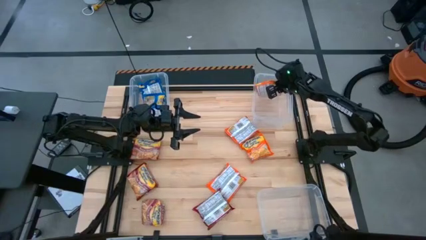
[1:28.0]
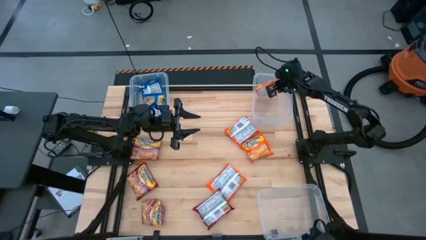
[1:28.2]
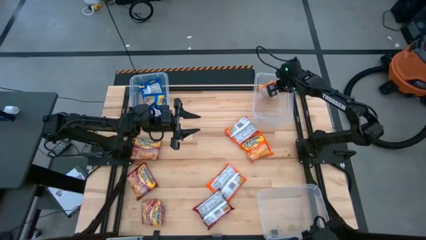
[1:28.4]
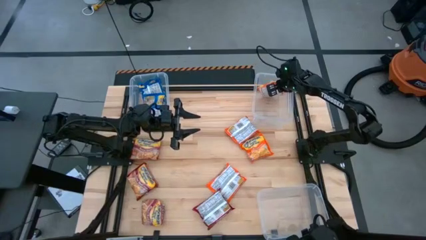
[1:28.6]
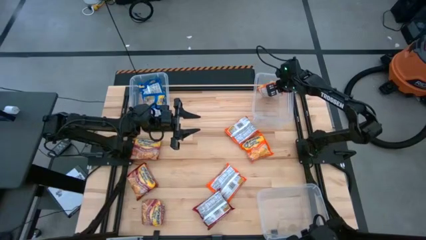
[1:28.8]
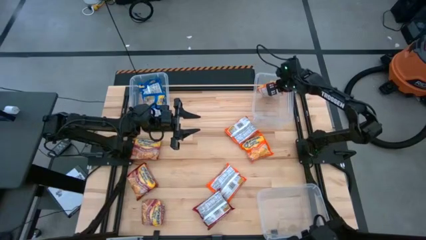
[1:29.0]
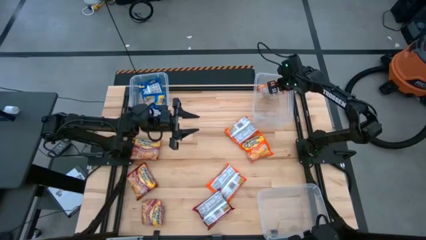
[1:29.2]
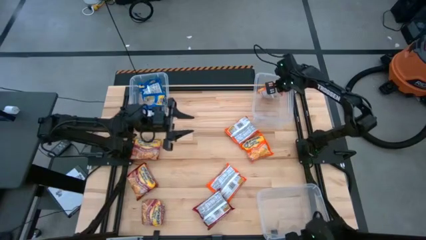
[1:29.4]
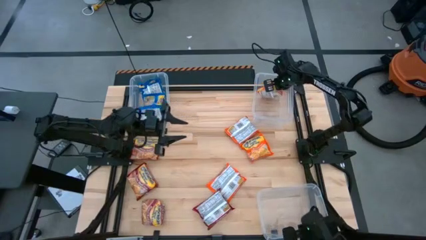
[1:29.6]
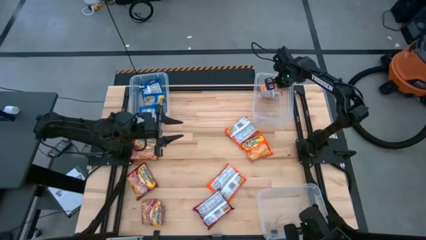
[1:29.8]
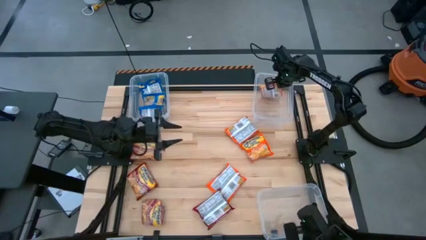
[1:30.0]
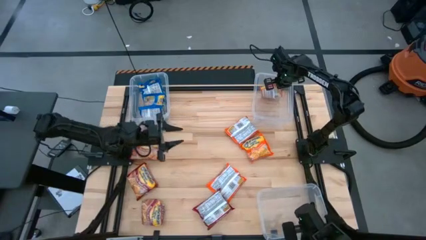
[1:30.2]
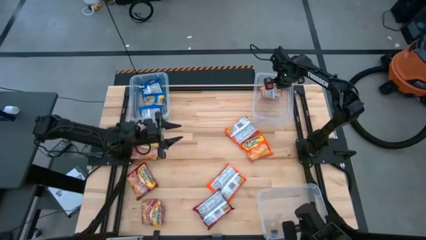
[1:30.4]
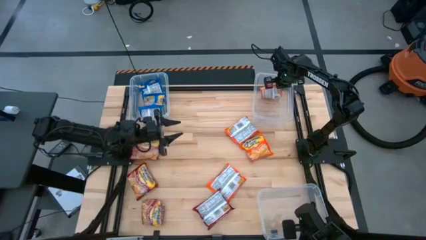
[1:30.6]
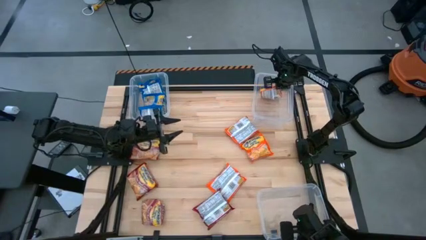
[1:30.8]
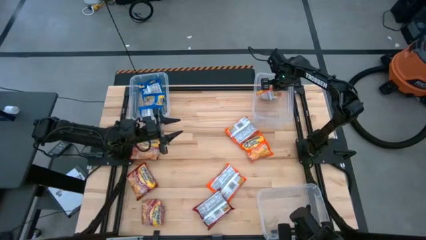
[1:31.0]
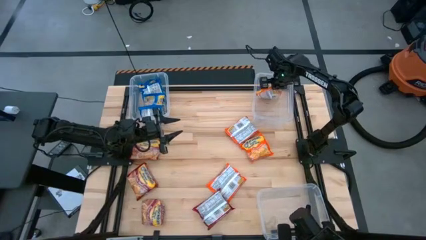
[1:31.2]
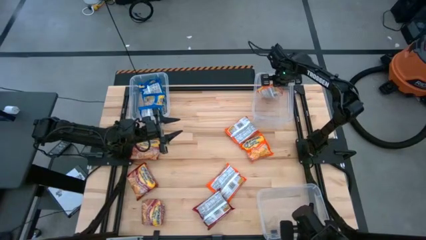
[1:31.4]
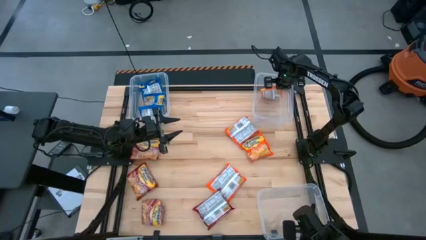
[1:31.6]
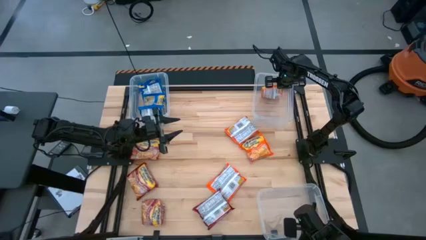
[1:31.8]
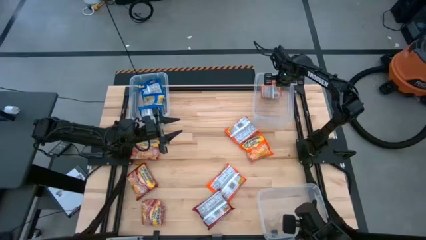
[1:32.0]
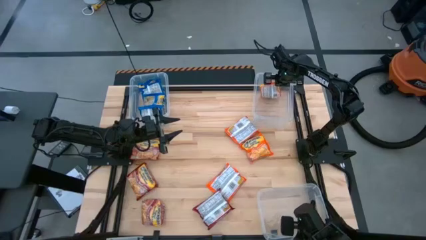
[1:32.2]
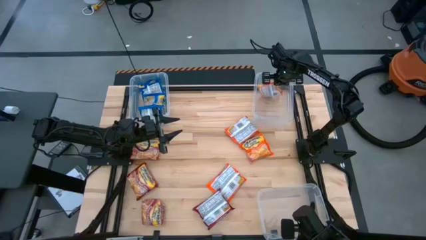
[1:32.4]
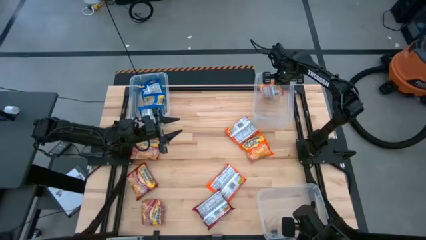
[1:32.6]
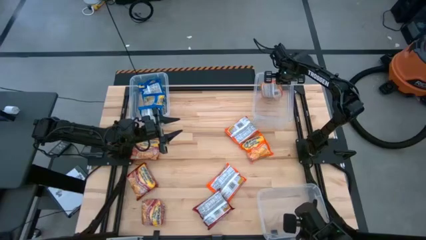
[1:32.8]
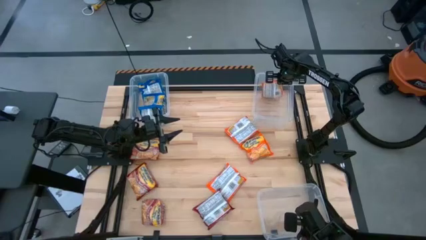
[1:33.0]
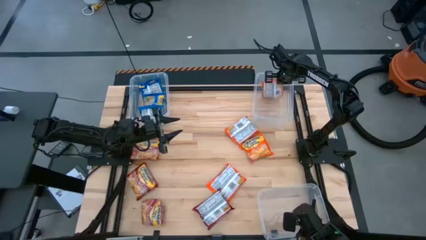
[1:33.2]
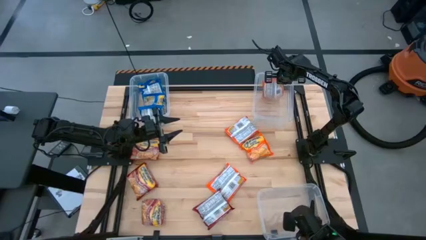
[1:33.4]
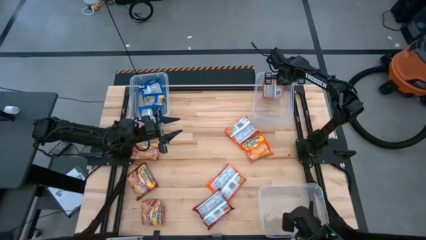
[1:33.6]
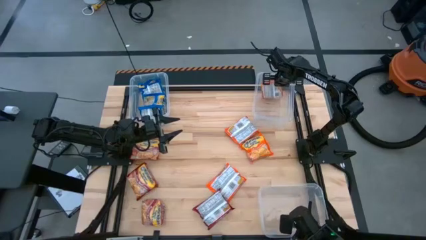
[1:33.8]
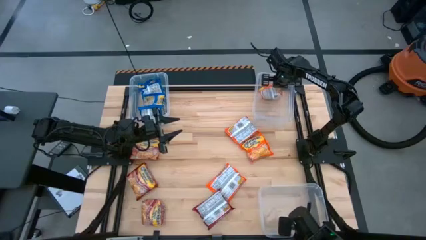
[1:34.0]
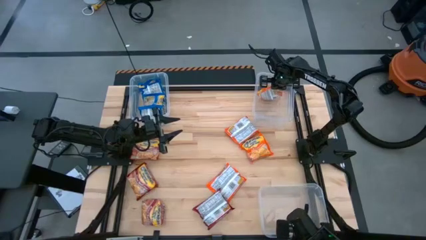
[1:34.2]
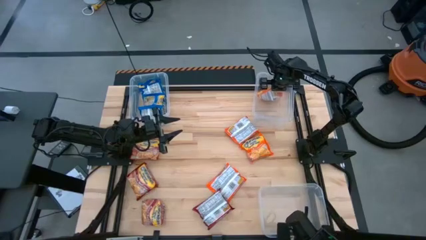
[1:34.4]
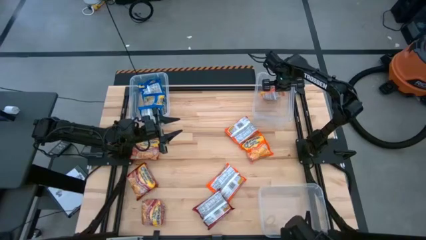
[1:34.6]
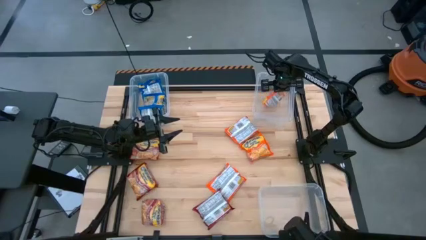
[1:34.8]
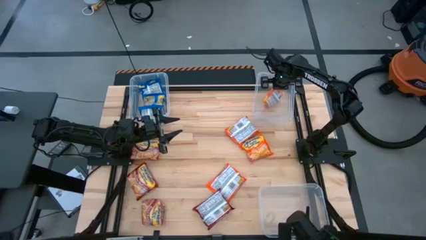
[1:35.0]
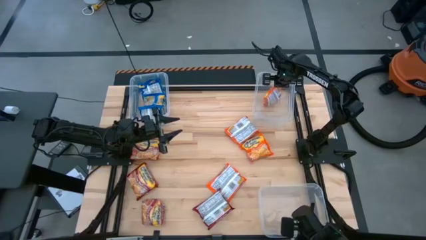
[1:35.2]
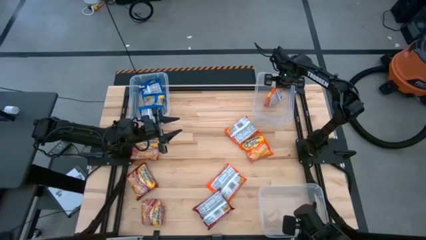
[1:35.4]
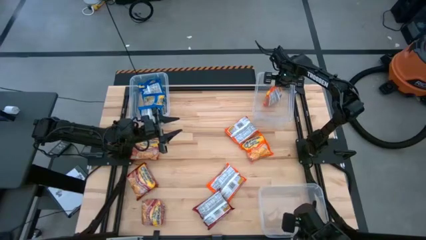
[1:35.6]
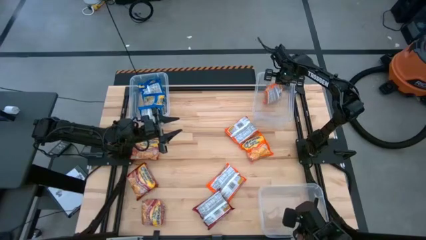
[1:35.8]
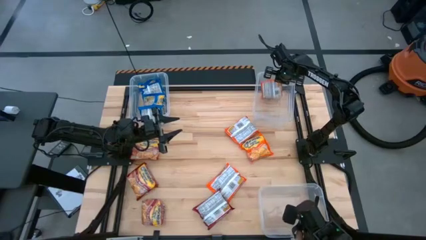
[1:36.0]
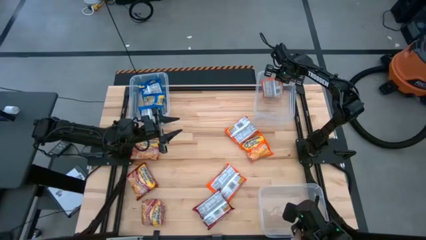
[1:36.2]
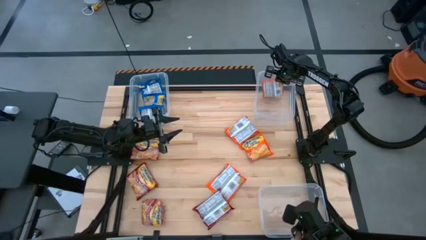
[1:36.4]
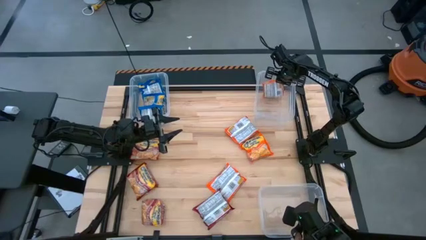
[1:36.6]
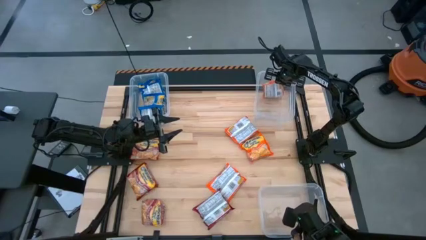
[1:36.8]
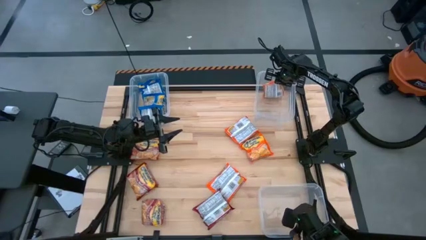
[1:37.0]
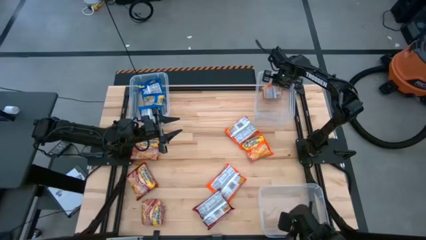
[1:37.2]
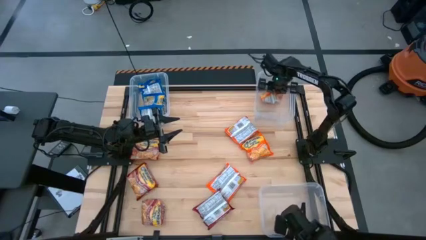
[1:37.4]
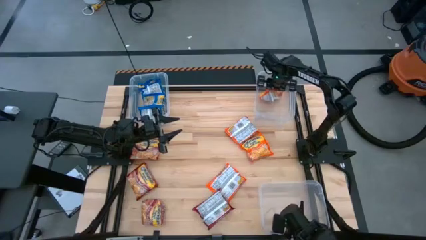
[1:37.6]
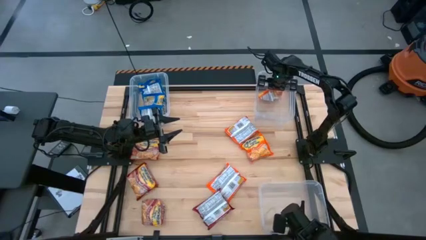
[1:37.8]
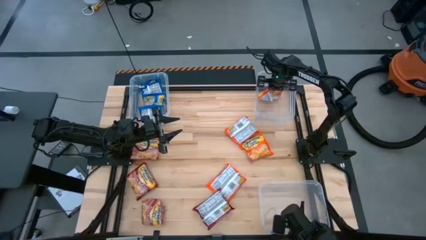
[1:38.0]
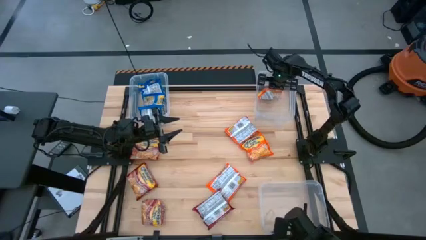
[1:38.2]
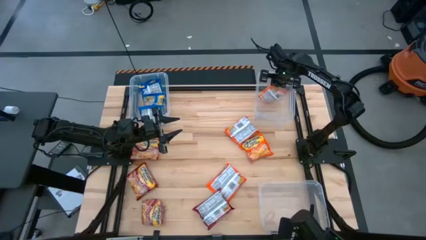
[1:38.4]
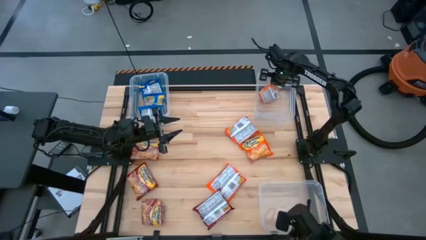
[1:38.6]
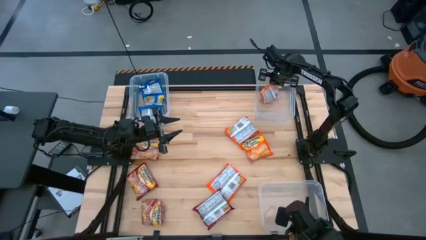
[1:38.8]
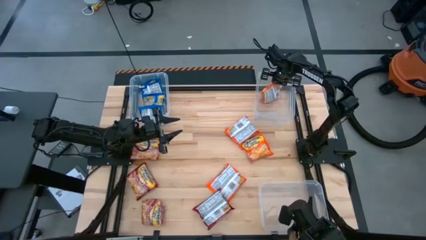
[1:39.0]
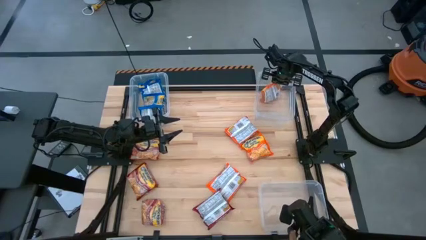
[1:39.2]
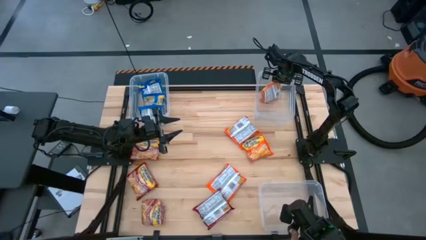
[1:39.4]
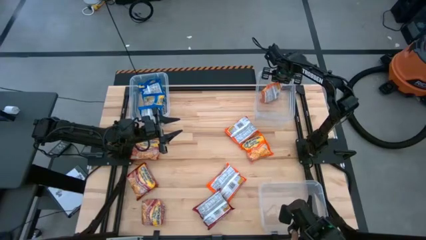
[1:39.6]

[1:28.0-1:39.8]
Task: Sort Maruchan noodles
Put the orange noodle pack into the top right transparent bin
